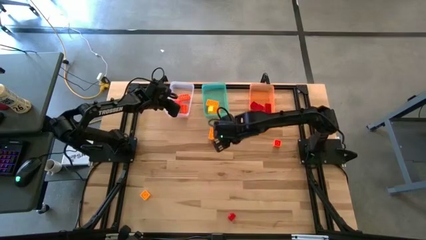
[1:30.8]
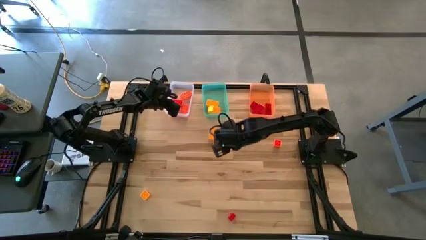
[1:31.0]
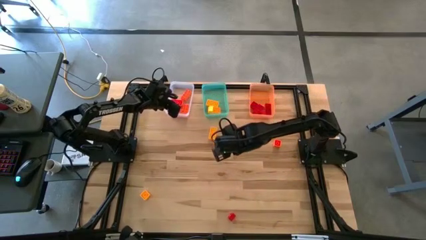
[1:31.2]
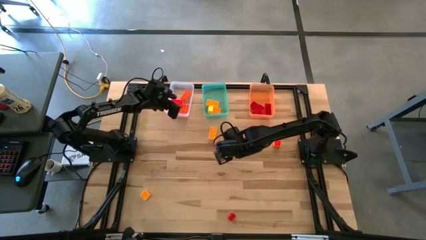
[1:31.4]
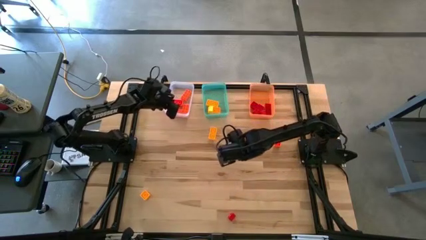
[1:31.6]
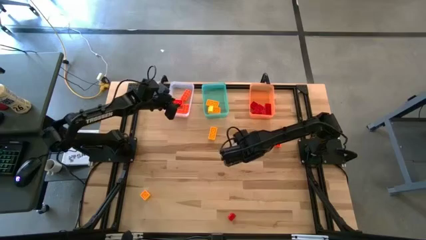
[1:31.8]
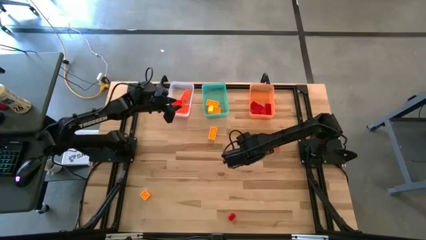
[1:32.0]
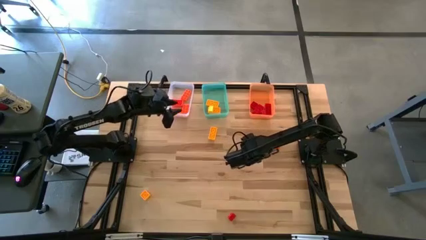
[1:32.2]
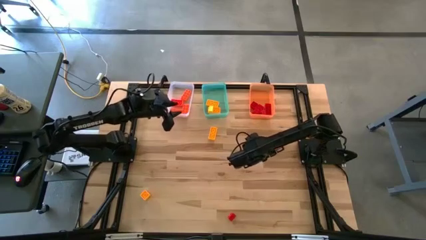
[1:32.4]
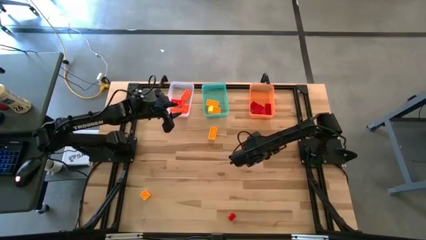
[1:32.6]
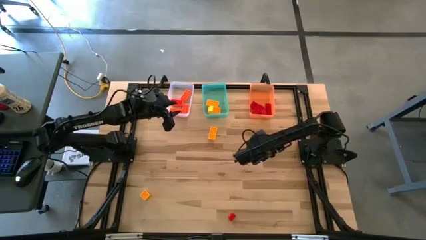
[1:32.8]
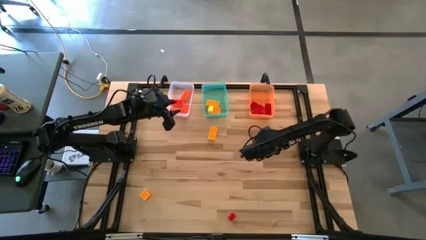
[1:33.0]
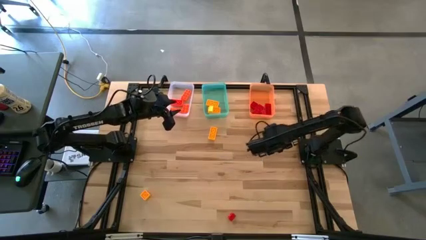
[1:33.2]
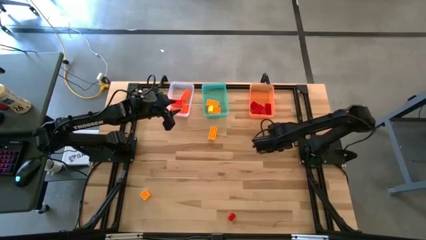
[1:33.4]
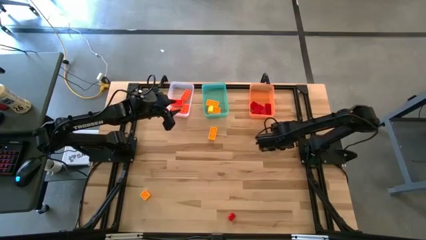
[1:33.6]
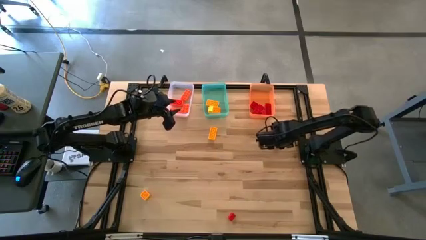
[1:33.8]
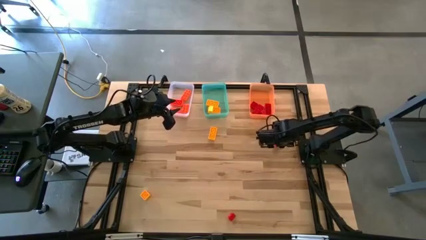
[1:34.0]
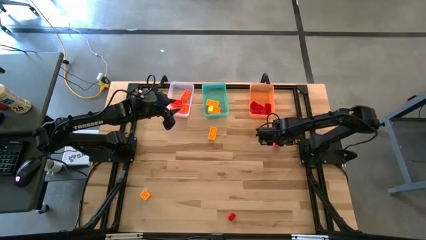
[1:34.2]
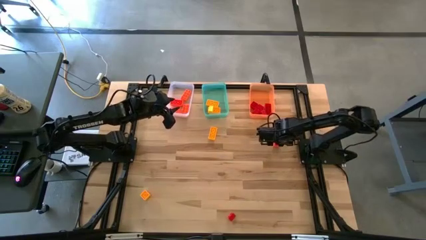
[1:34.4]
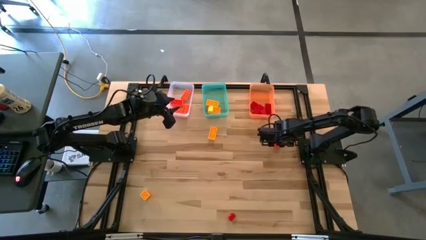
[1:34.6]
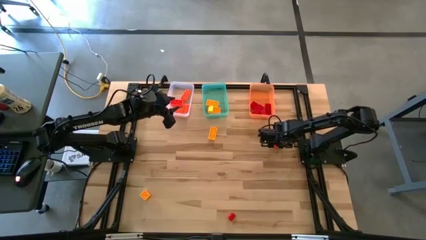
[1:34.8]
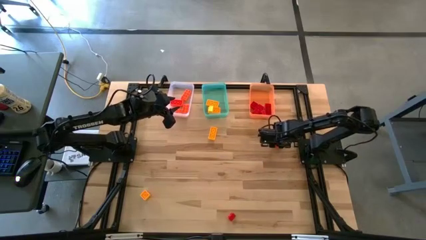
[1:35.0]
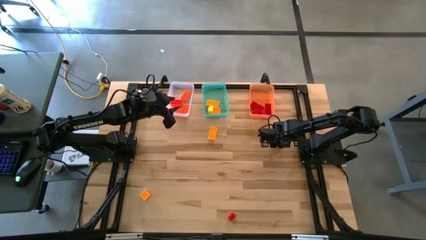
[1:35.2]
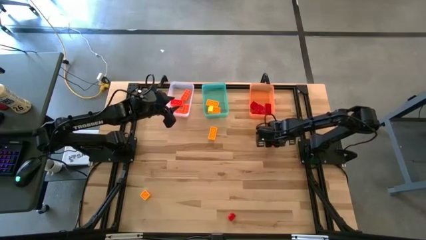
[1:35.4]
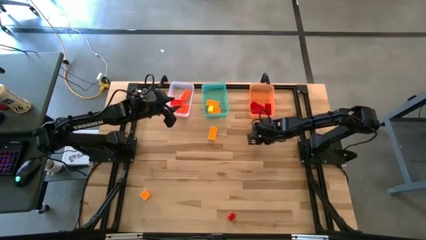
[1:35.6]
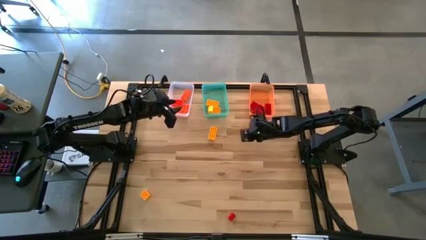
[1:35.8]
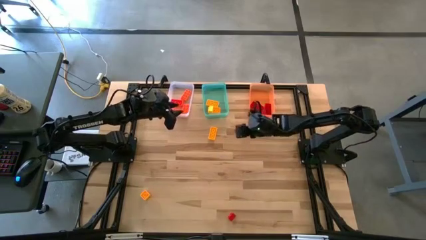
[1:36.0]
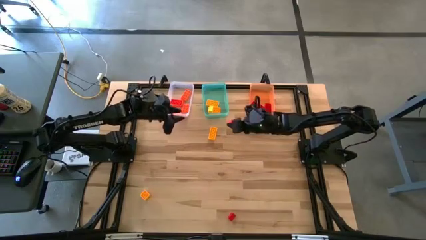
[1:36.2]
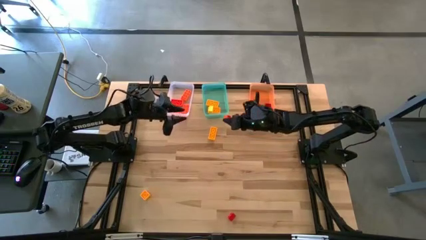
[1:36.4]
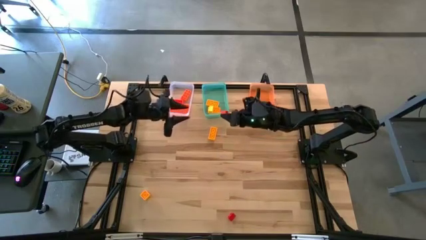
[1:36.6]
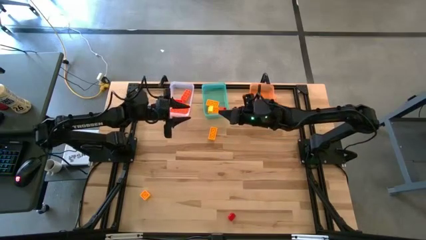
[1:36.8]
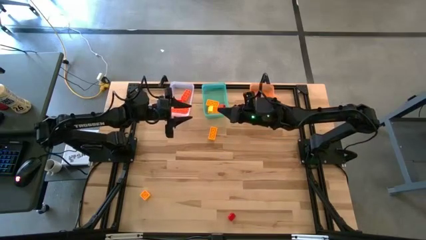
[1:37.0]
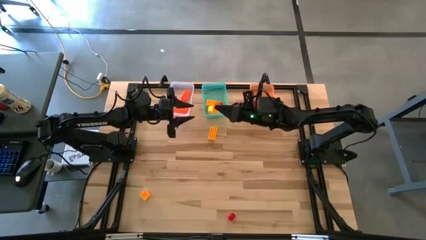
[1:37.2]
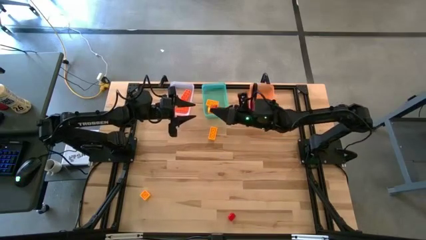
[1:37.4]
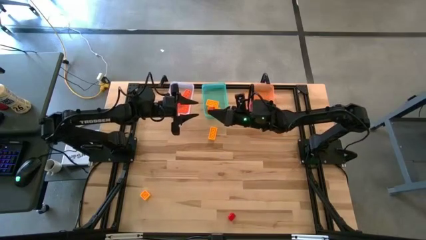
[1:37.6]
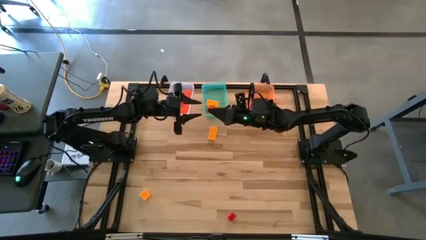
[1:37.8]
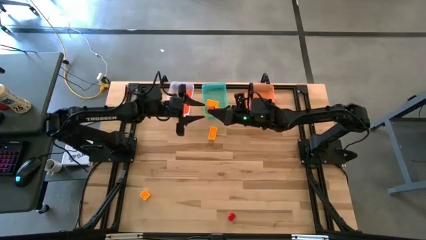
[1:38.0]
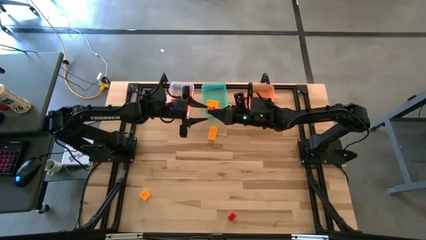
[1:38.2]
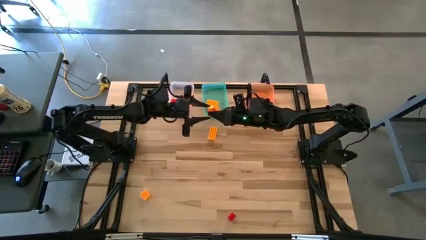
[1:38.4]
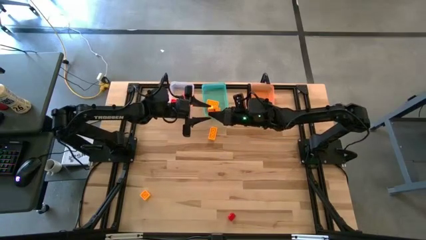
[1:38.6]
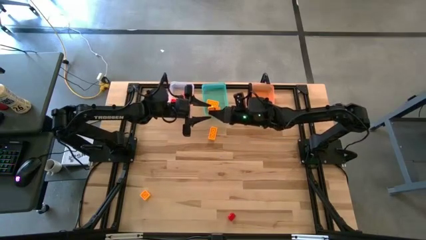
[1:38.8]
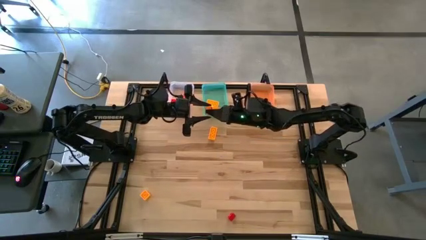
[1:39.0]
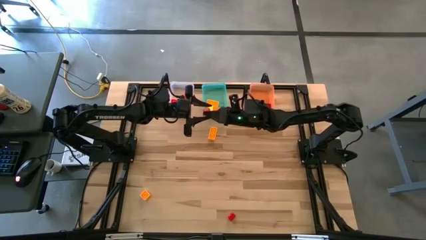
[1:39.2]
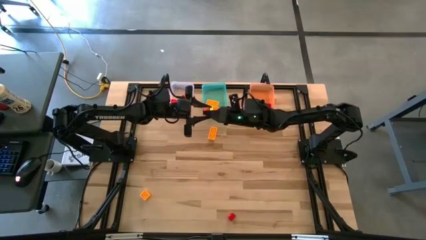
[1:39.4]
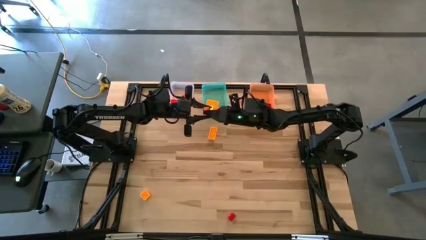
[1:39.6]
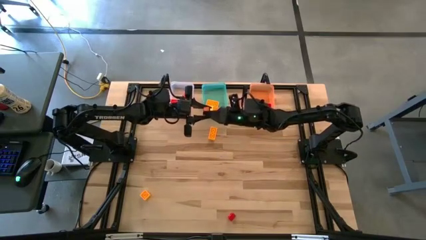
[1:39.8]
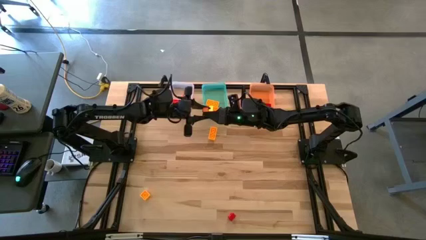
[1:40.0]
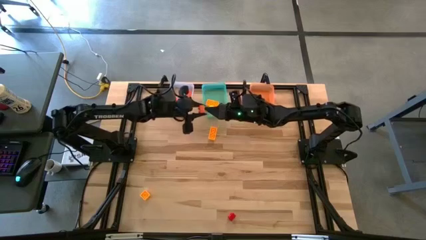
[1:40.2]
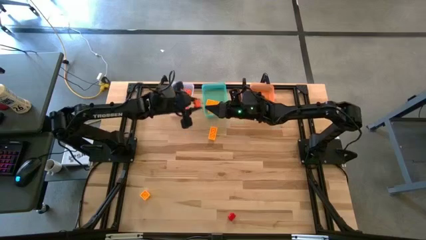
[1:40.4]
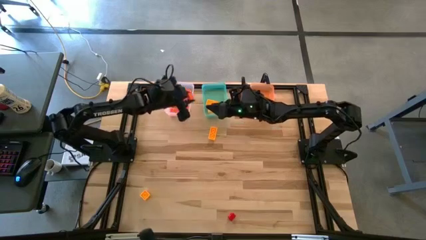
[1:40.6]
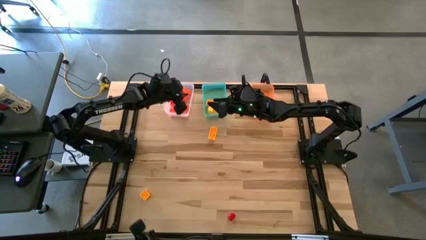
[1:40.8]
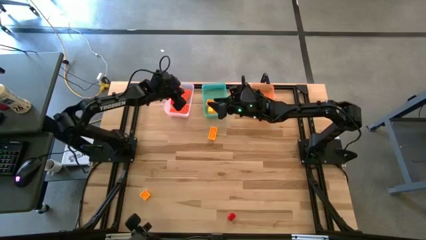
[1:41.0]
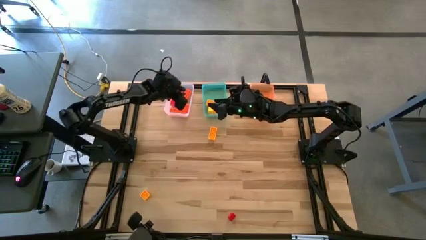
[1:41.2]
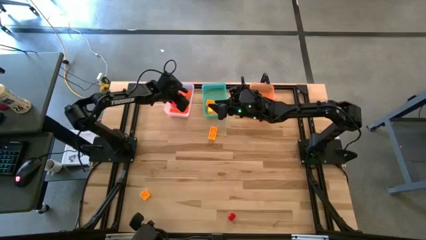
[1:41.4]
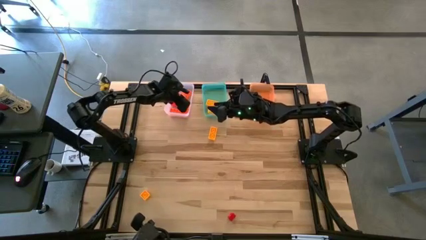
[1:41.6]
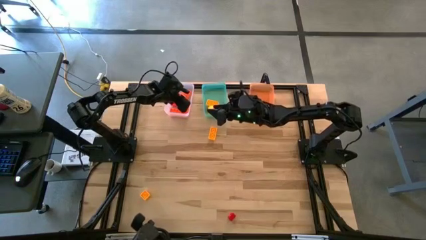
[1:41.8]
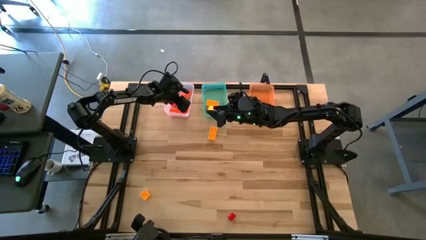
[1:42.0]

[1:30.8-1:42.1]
Task: Sort & place blocks by color
Put the orange game piece into the transparent bin

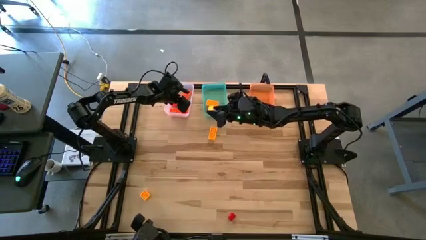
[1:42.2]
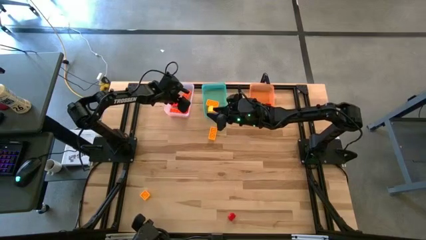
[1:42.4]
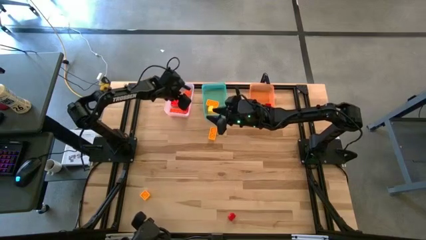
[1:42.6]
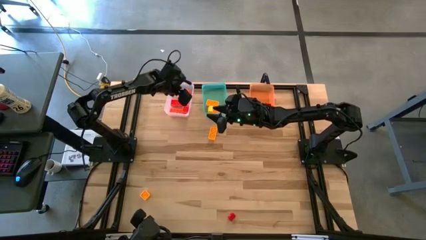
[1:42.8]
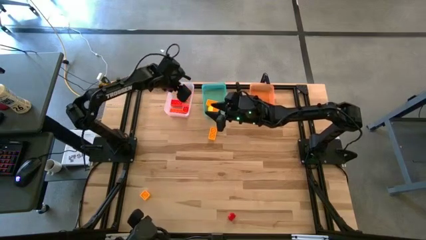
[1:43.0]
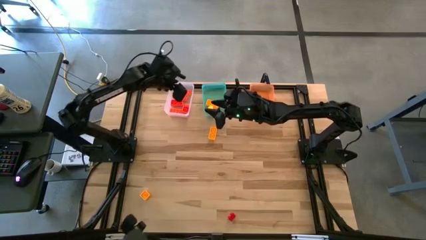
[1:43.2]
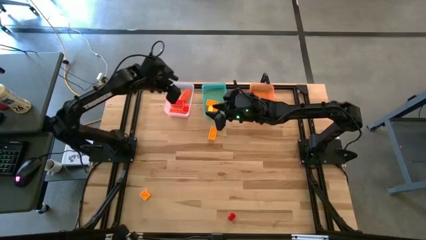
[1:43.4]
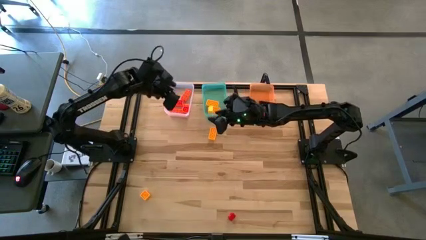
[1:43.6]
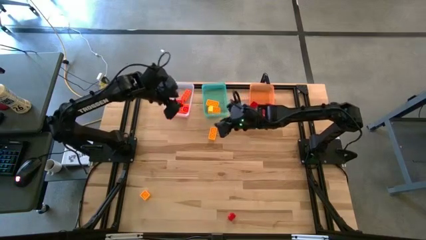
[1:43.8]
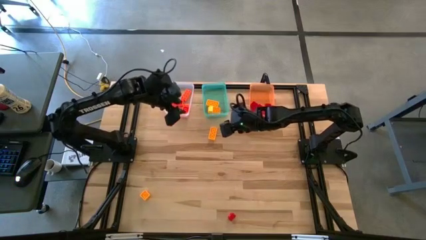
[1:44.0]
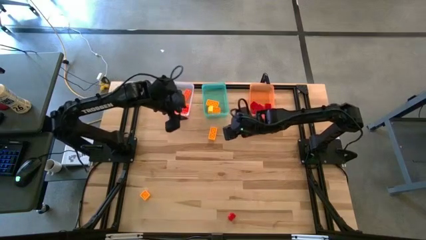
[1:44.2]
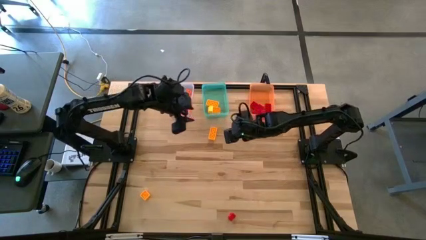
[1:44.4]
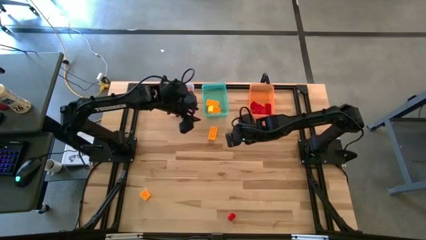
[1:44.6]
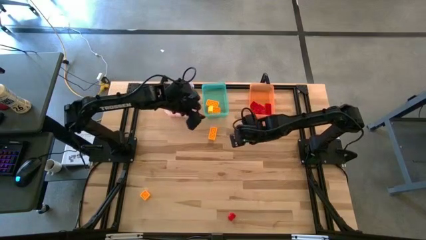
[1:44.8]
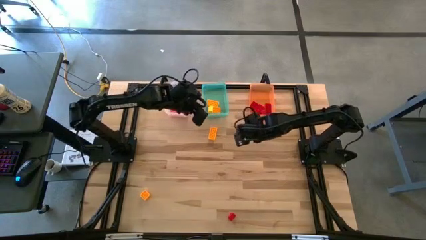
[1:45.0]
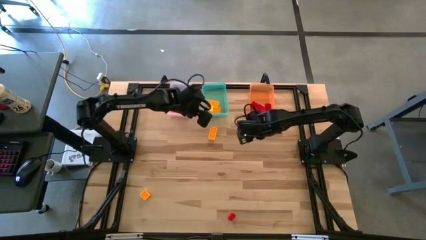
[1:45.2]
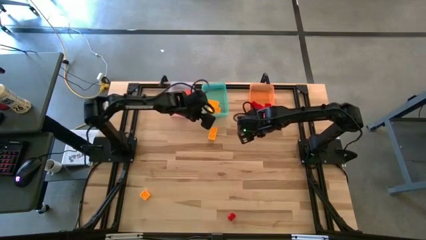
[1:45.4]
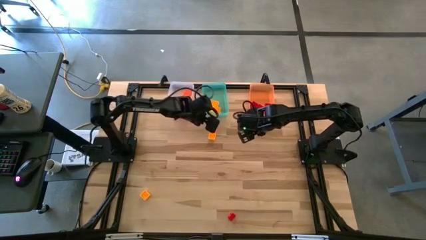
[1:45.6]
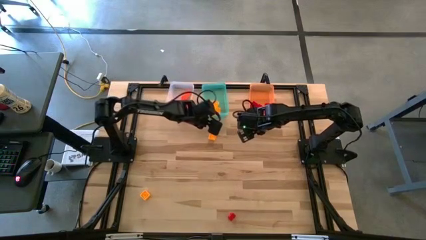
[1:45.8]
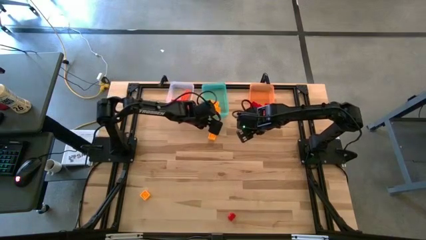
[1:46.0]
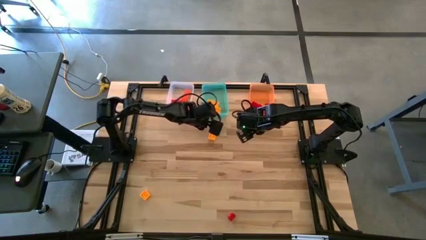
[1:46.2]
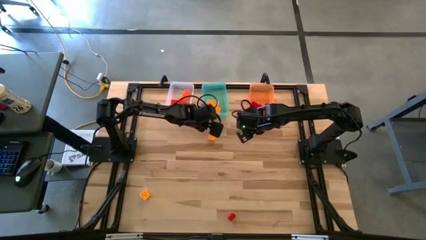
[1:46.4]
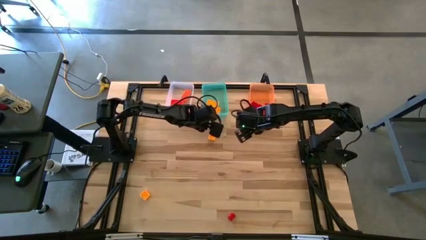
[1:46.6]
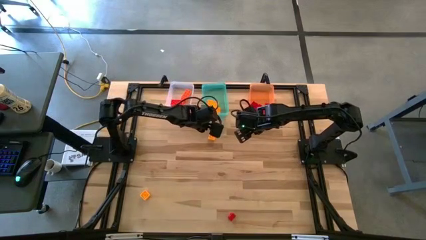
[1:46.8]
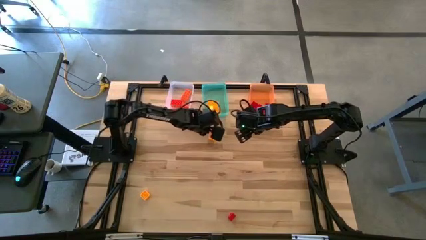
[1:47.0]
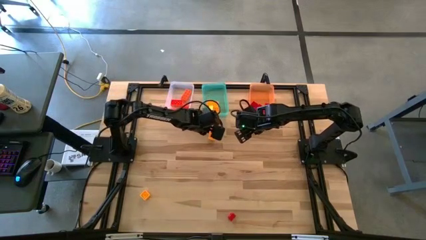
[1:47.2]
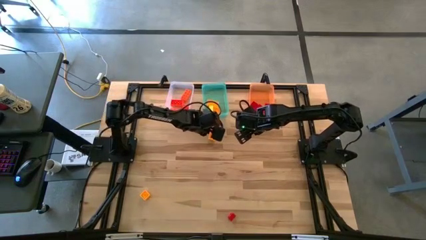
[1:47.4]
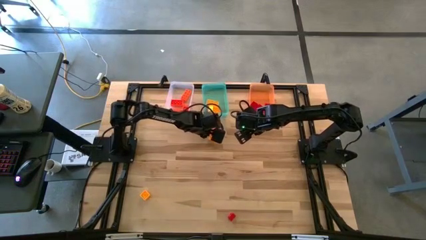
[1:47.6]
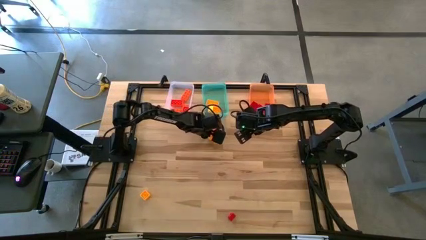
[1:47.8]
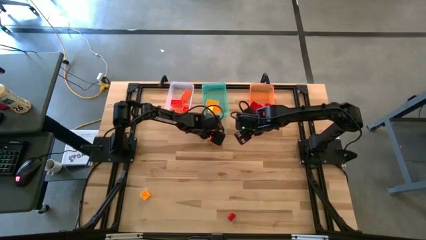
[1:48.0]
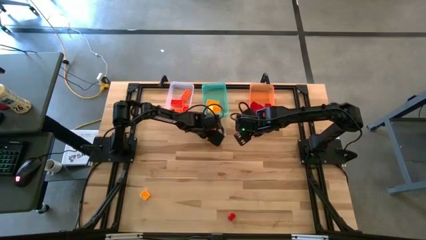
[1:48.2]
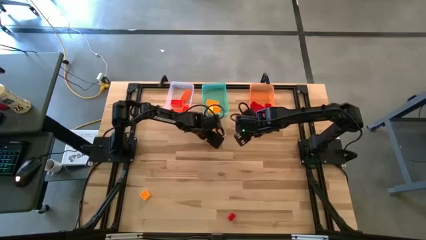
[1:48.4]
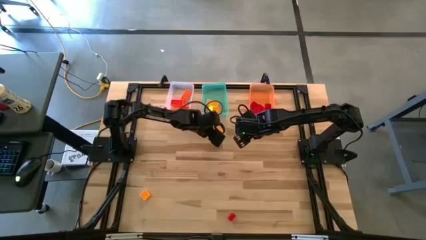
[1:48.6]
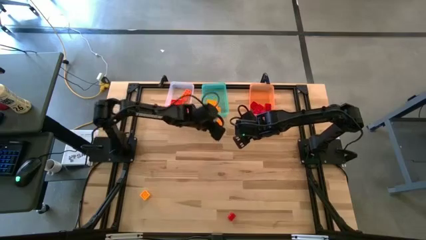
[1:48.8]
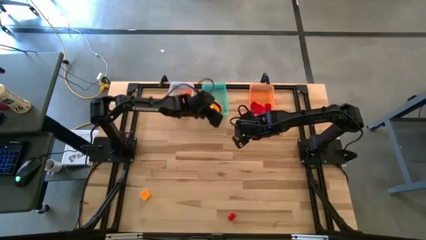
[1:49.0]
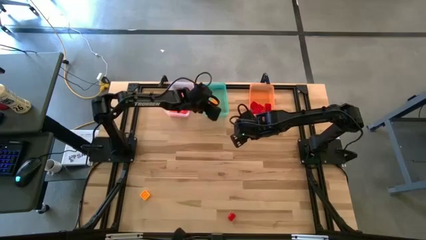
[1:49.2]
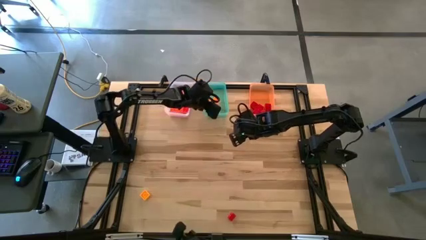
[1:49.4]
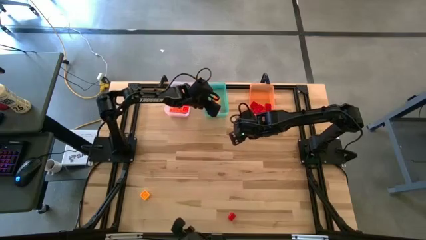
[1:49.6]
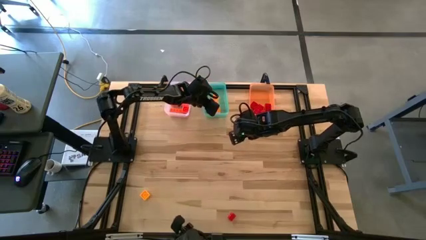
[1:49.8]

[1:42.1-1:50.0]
Put the yellow game piece into the green bin
